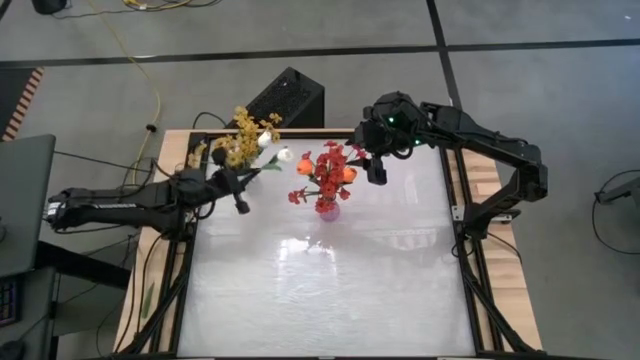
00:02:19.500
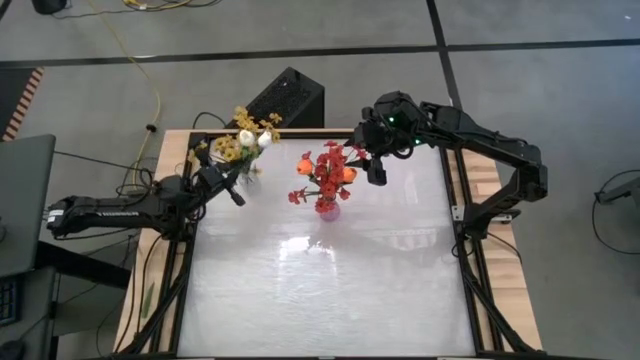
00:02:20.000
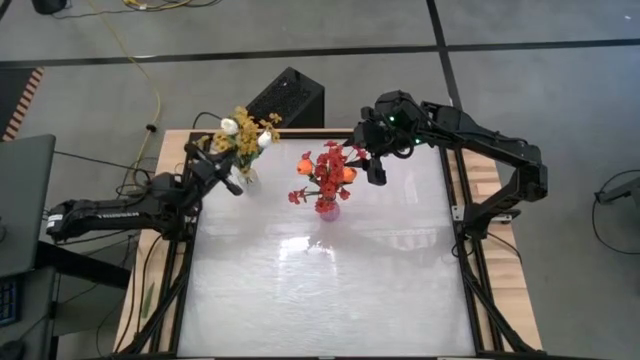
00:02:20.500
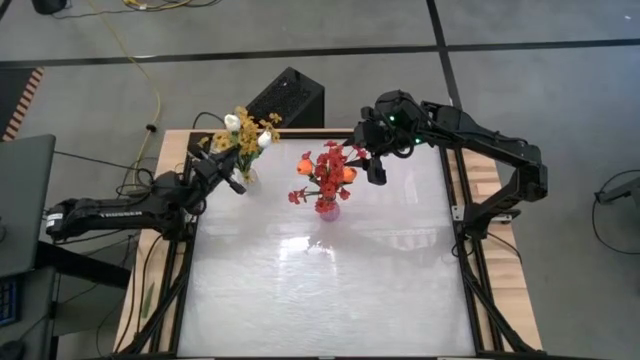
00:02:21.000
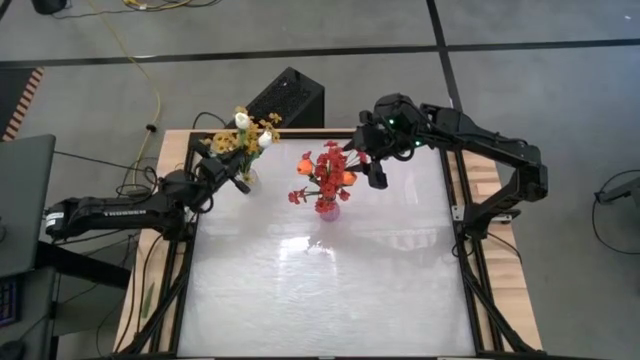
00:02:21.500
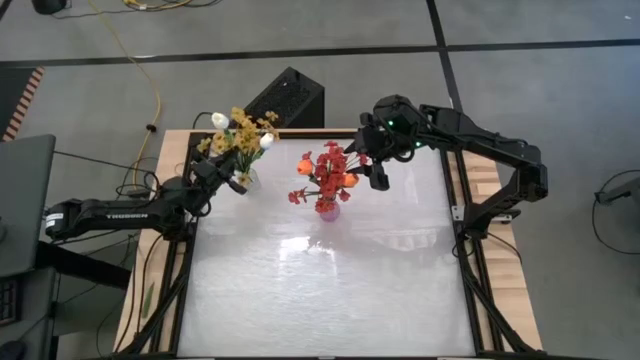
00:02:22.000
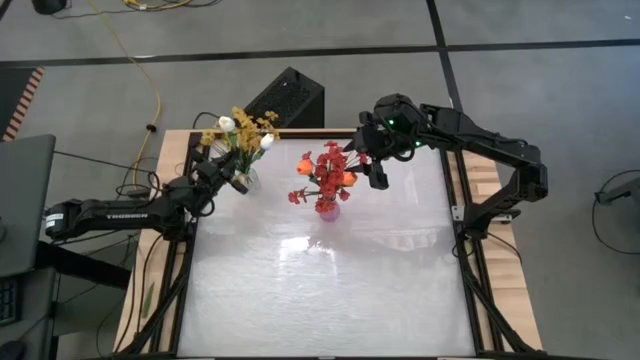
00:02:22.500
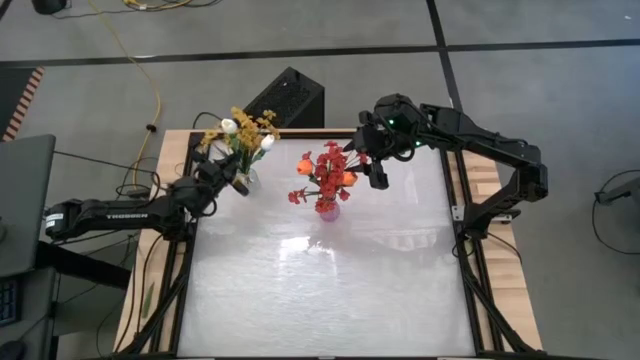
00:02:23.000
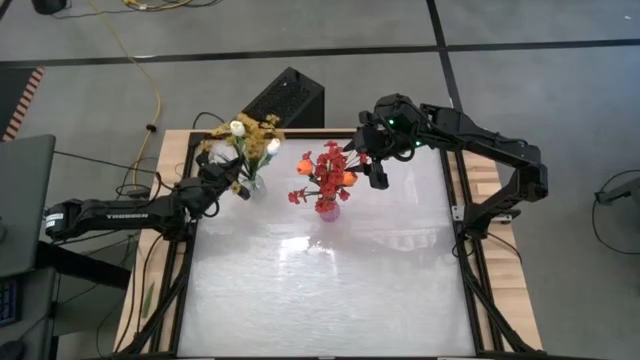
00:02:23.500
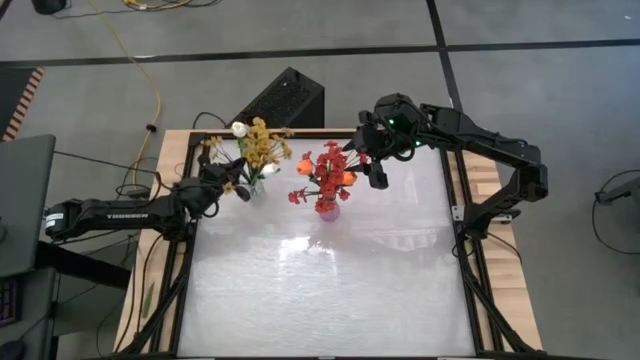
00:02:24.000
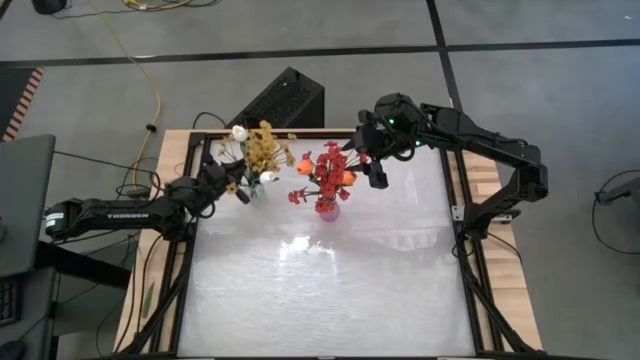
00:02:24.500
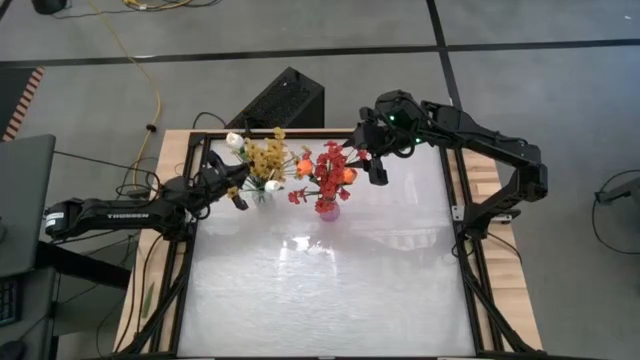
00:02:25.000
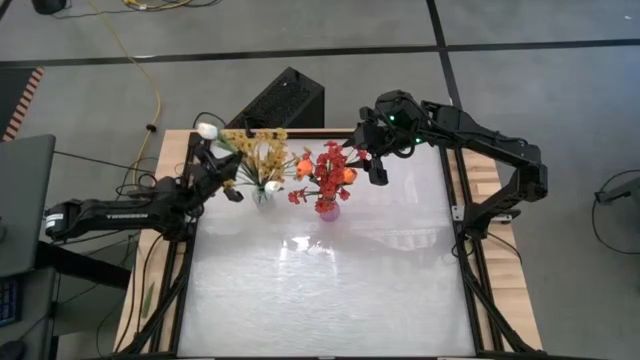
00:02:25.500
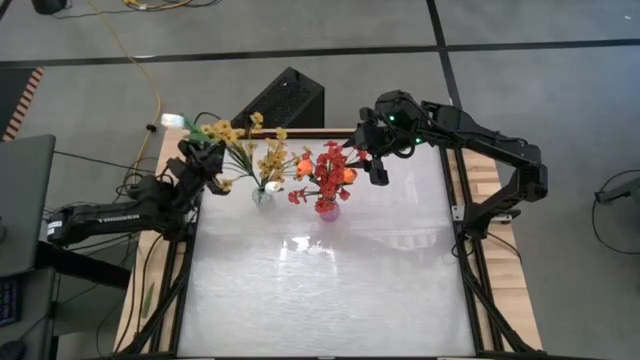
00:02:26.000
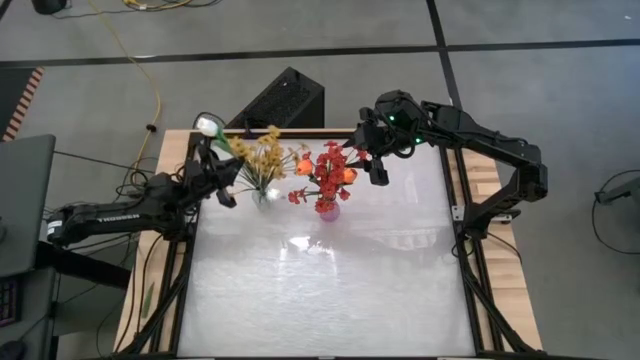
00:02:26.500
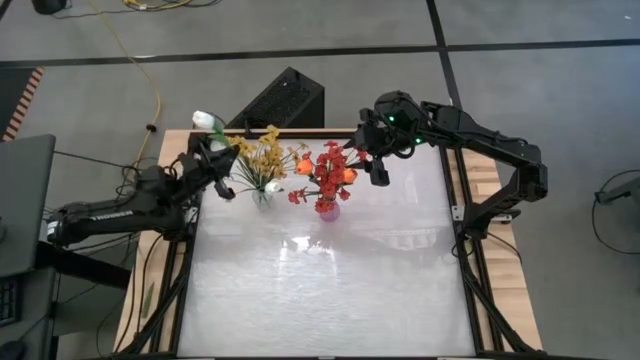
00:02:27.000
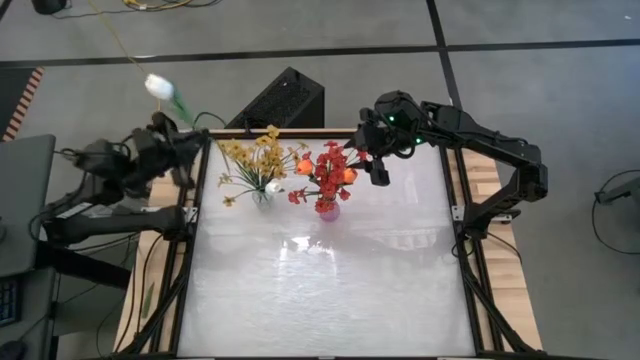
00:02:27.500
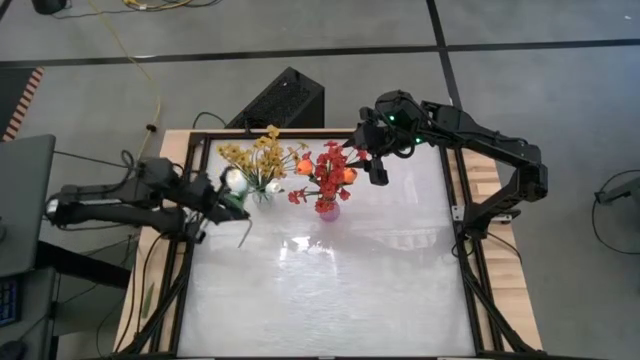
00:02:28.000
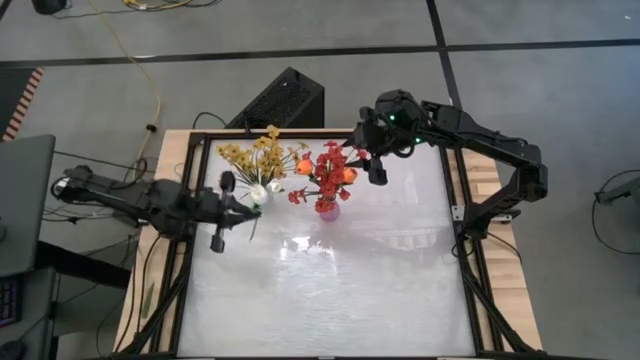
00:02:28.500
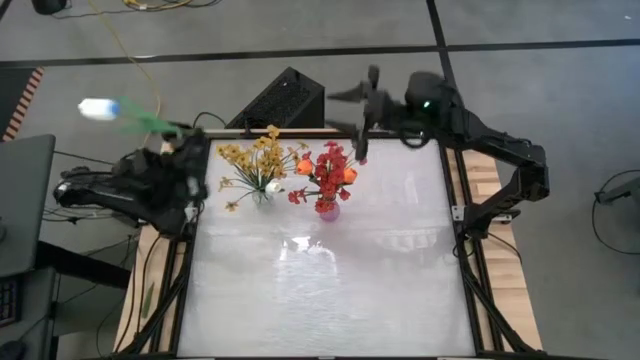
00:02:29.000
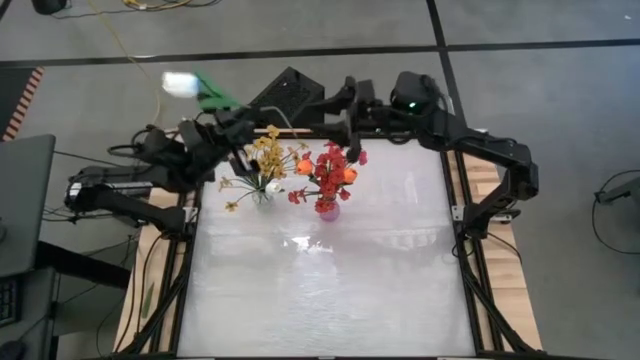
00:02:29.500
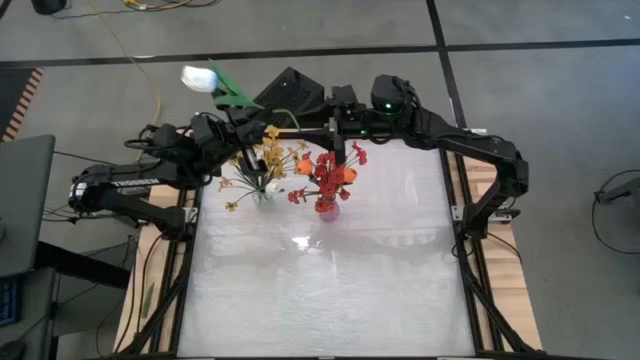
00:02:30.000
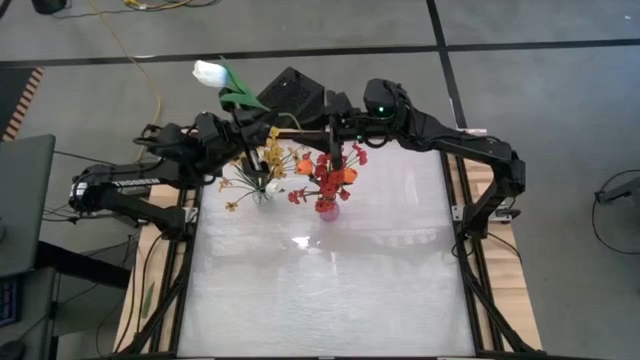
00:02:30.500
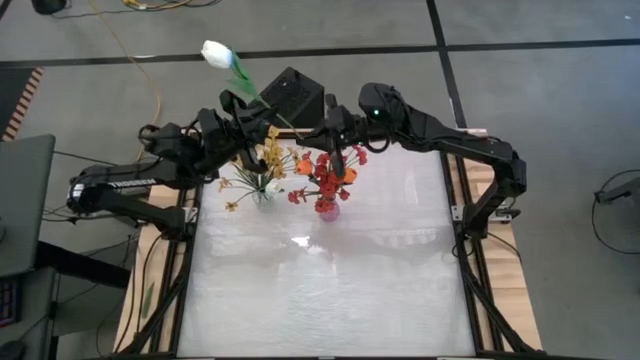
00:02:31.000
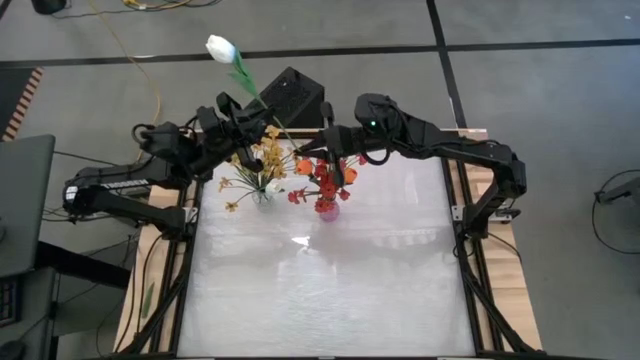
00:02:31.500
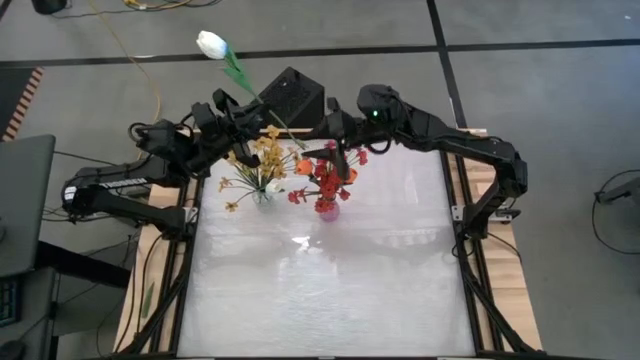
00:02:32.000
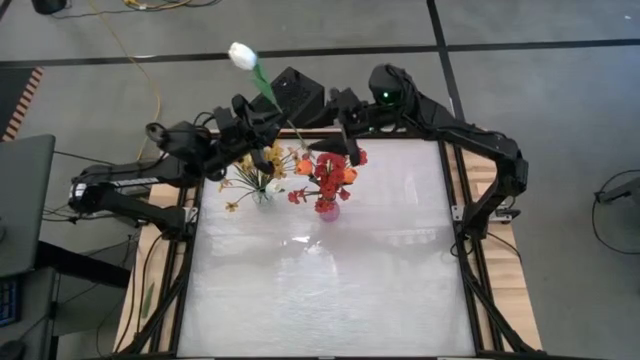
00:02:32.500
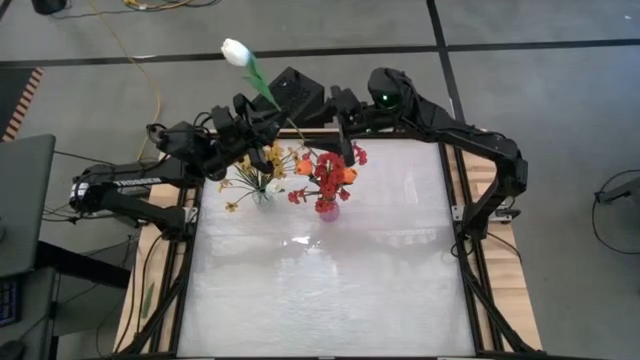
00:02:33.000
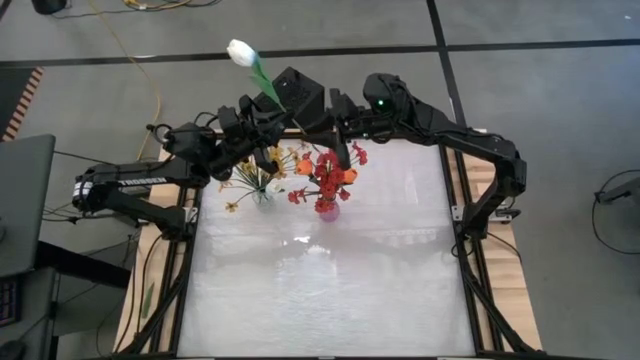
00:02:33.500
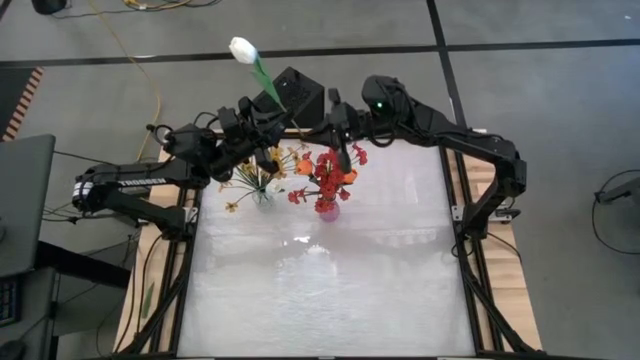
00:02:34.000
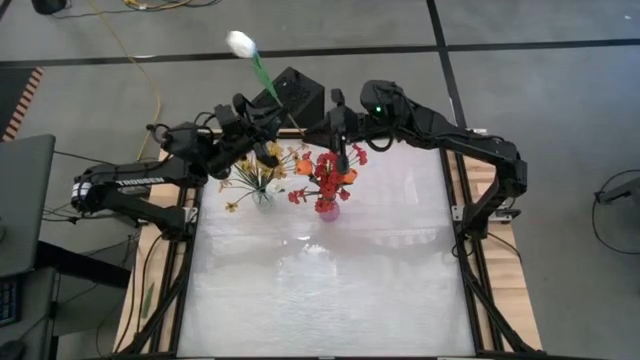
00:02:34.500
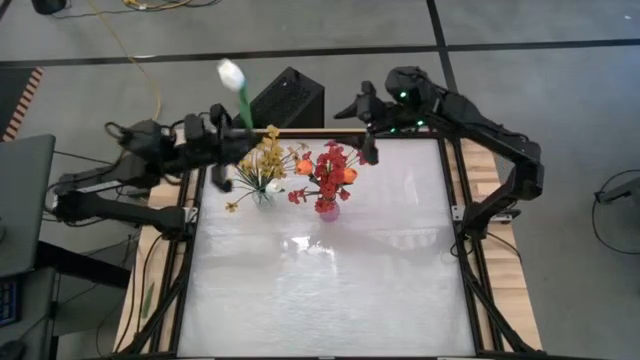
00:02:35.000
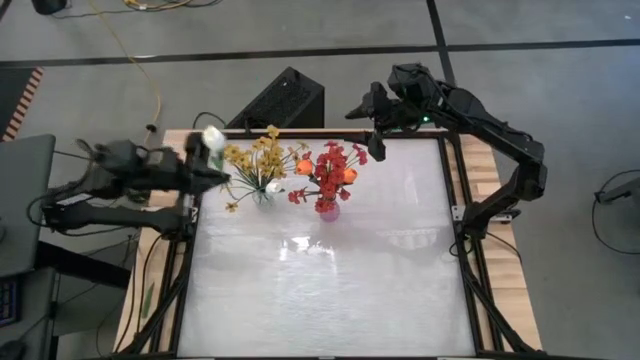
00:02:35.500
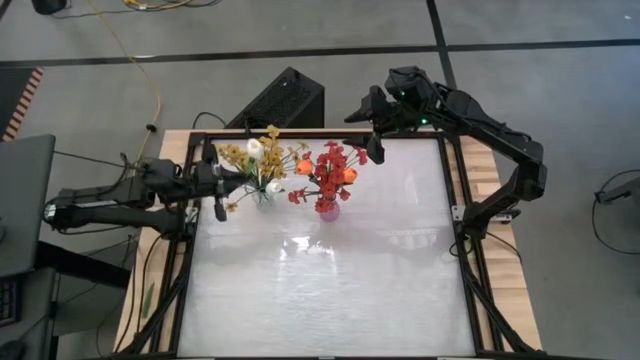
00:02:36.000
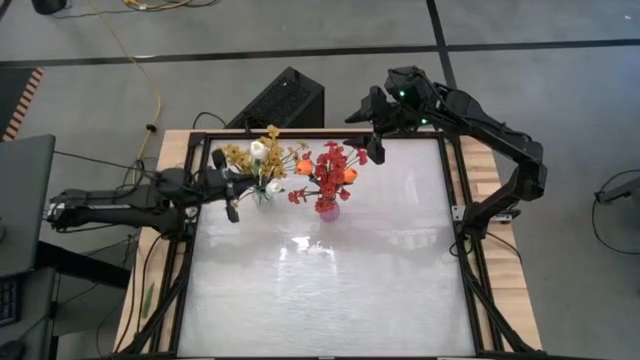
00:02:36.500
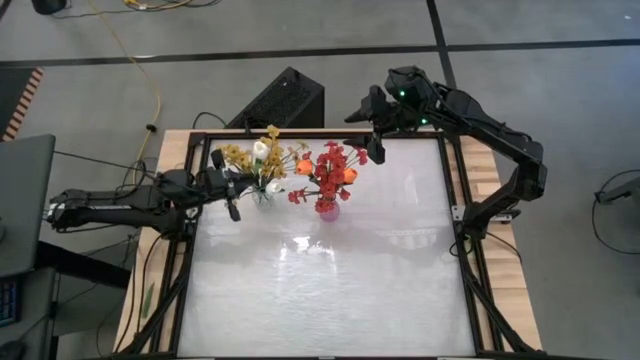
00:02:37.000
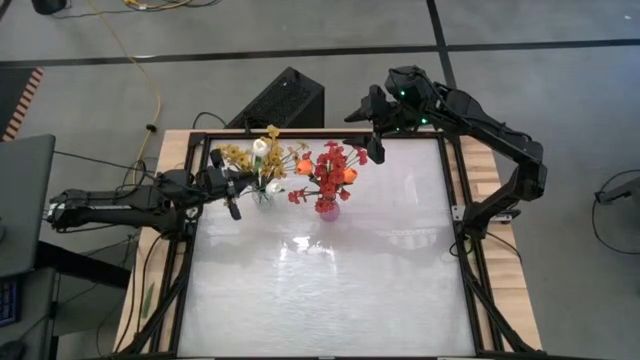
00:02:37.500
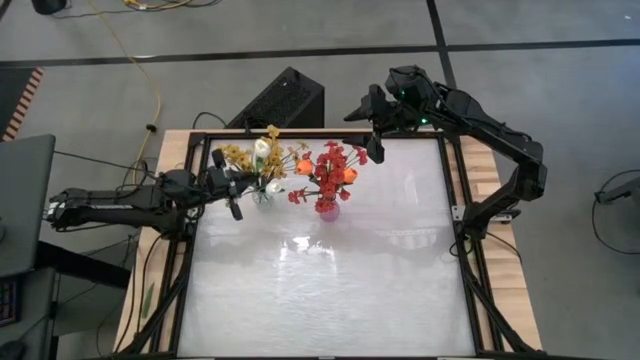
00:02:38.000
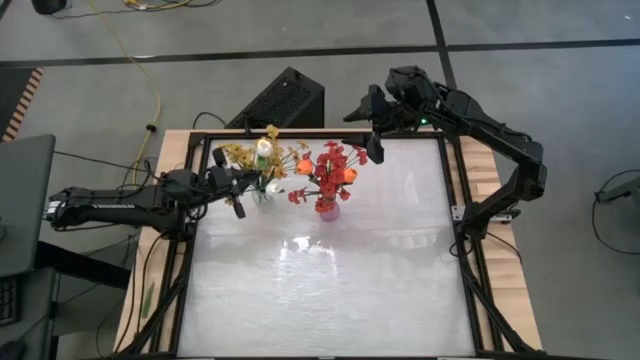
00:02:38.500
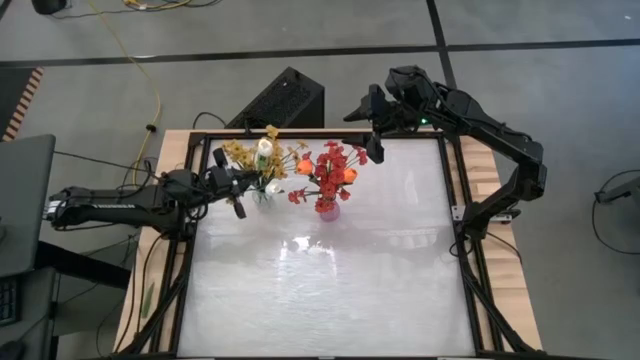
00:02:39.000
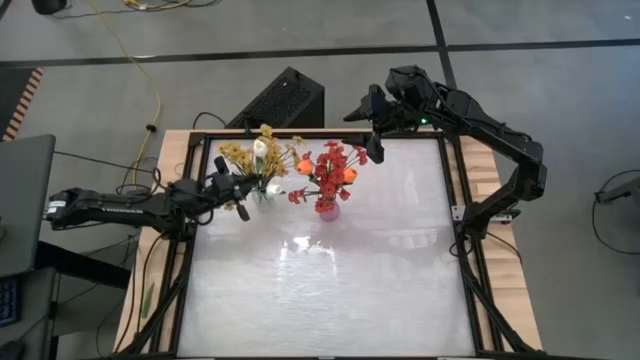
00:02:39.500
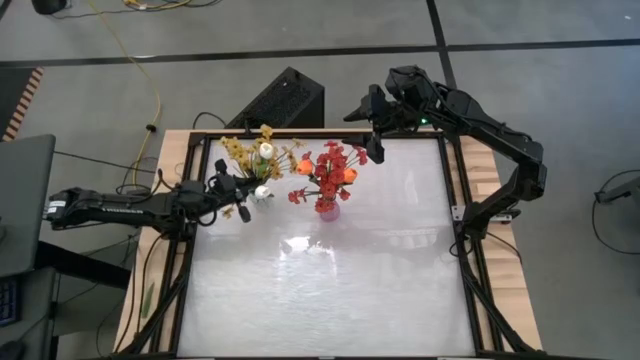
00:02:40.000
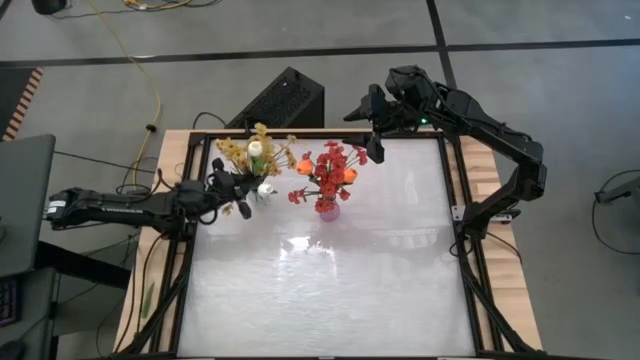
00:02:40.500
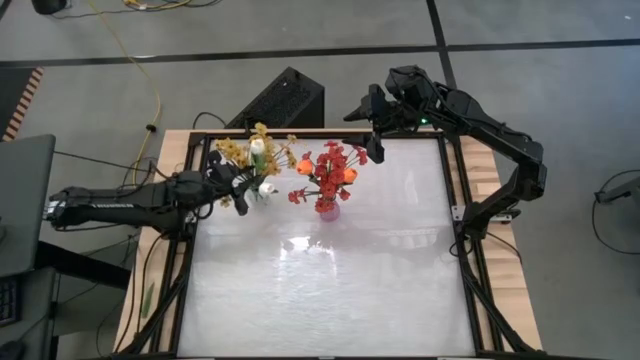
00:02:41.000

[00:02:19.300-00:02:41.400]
Task: Sort flowers into vase by color
Put the white tulip into the transparent vase
